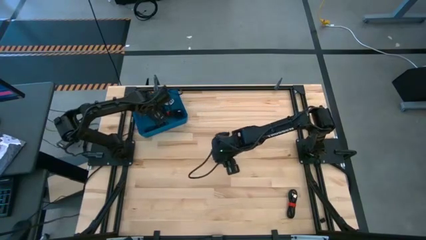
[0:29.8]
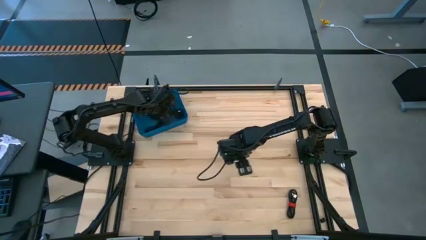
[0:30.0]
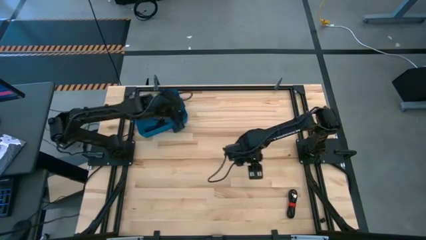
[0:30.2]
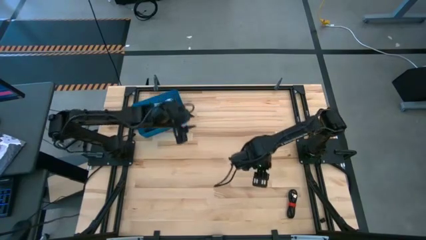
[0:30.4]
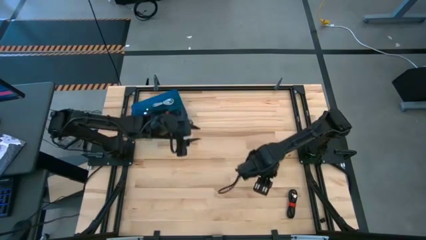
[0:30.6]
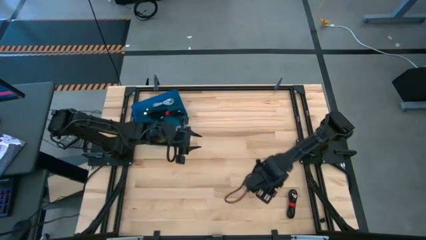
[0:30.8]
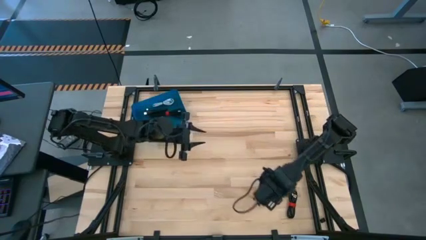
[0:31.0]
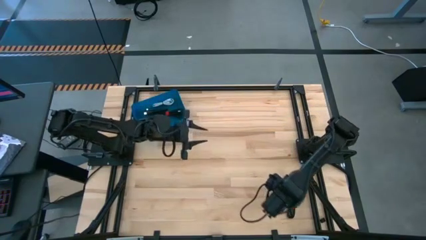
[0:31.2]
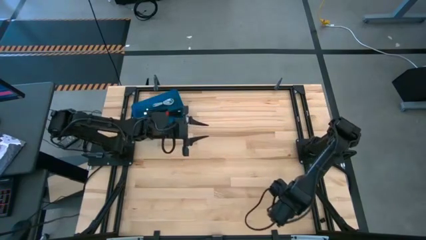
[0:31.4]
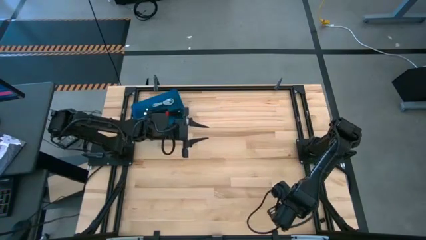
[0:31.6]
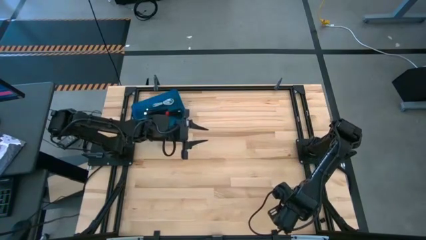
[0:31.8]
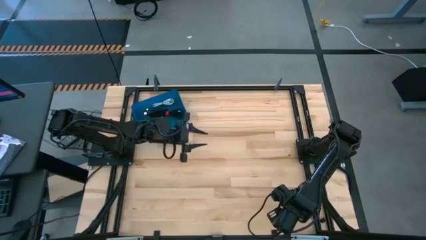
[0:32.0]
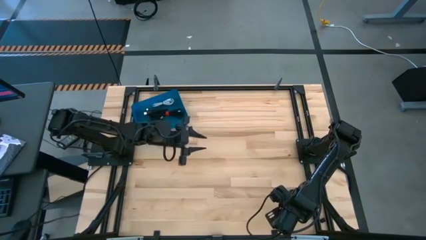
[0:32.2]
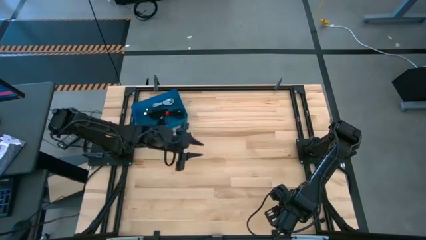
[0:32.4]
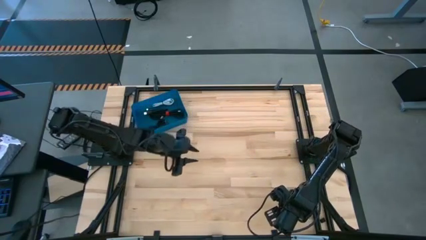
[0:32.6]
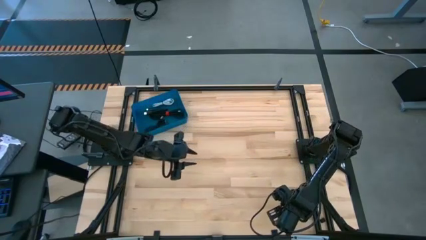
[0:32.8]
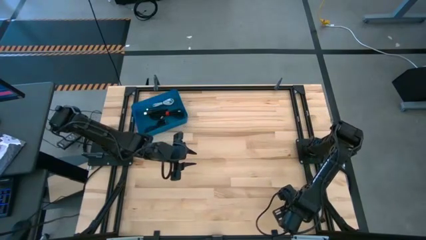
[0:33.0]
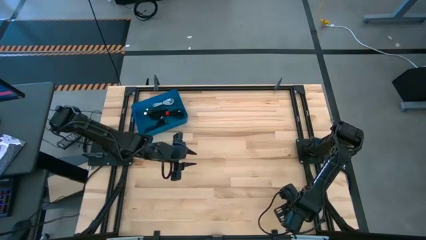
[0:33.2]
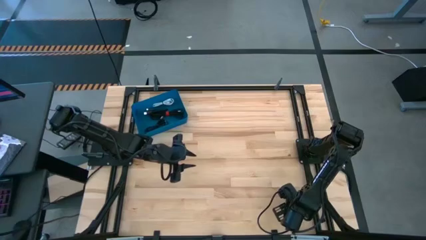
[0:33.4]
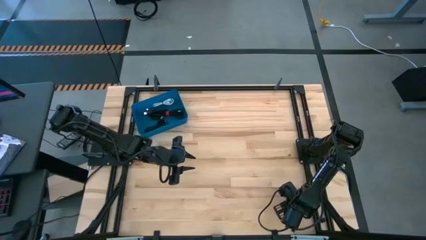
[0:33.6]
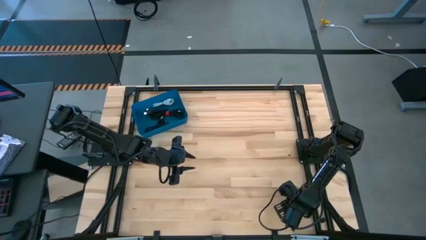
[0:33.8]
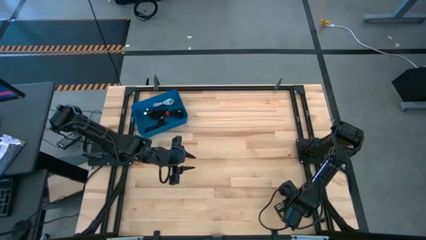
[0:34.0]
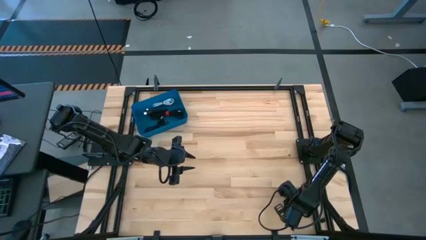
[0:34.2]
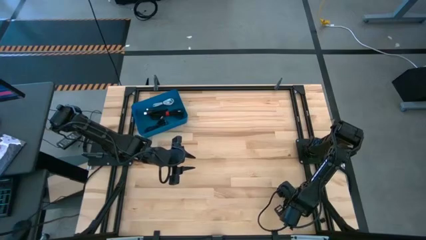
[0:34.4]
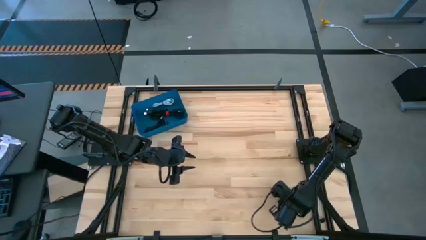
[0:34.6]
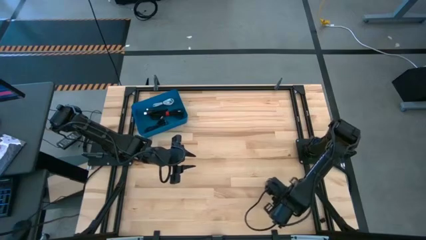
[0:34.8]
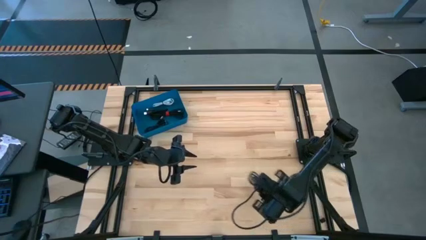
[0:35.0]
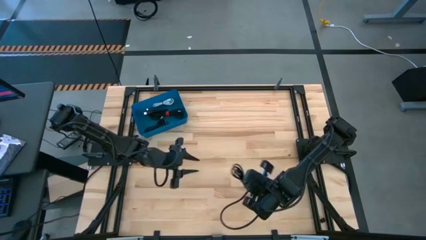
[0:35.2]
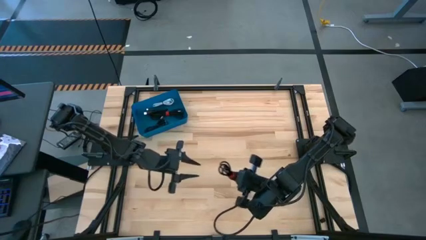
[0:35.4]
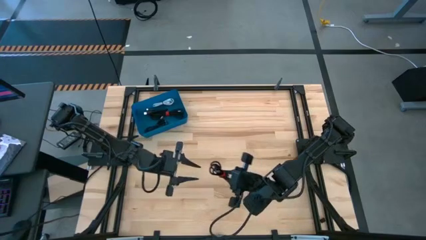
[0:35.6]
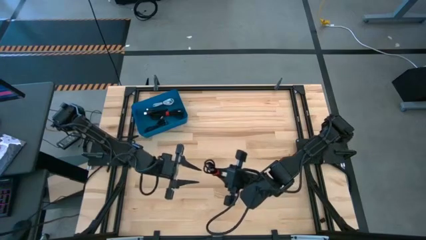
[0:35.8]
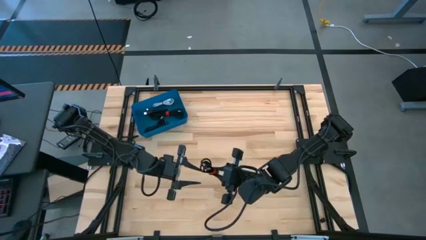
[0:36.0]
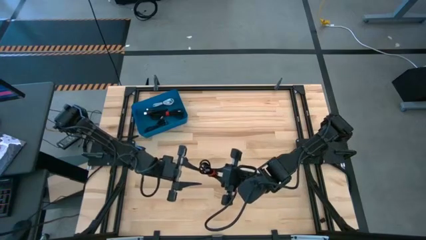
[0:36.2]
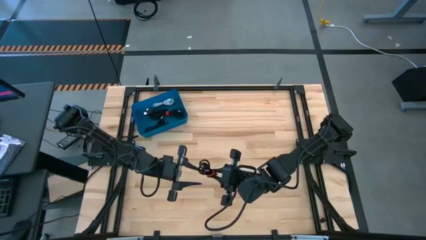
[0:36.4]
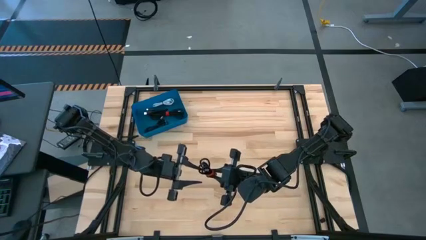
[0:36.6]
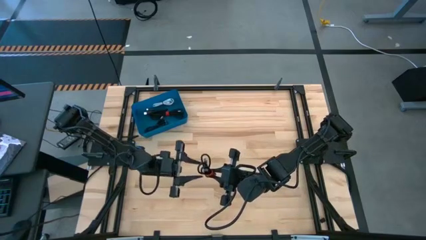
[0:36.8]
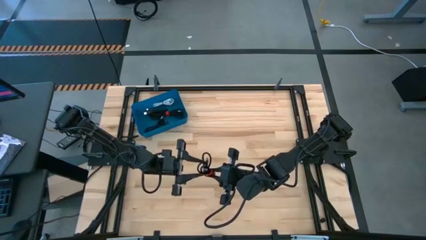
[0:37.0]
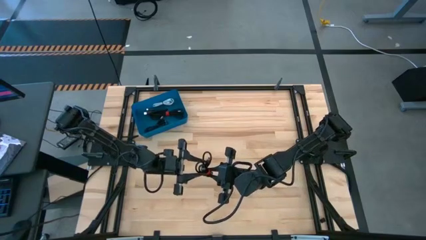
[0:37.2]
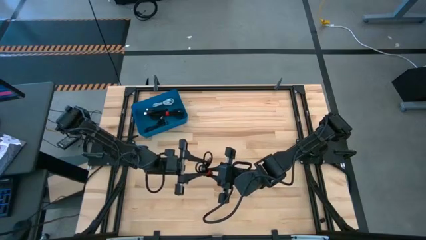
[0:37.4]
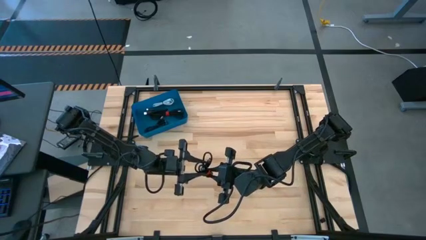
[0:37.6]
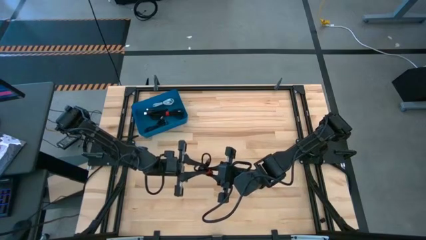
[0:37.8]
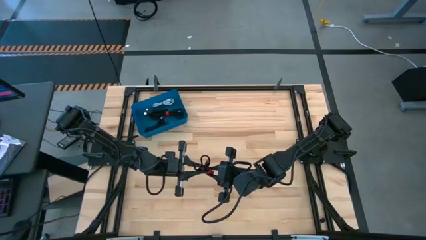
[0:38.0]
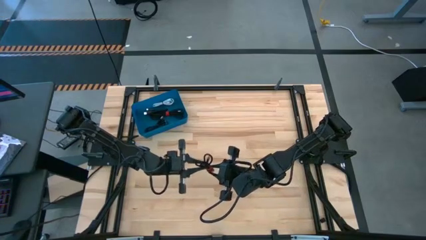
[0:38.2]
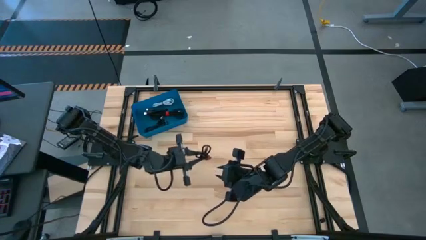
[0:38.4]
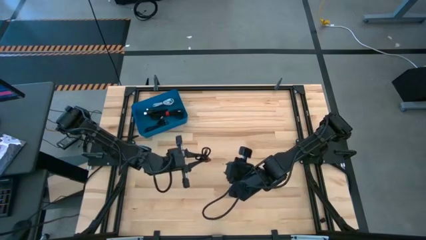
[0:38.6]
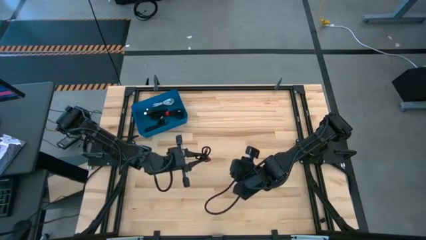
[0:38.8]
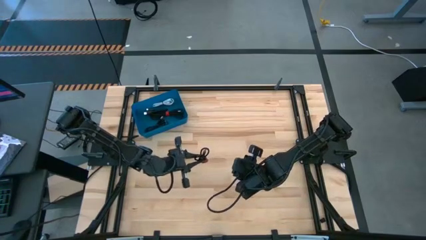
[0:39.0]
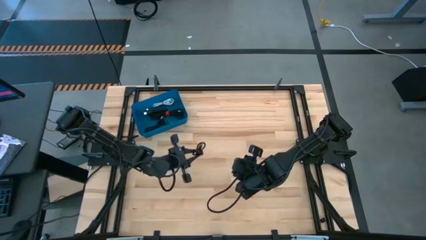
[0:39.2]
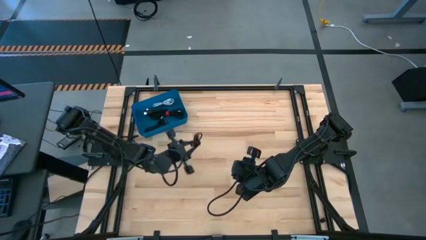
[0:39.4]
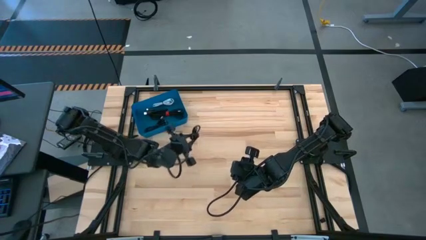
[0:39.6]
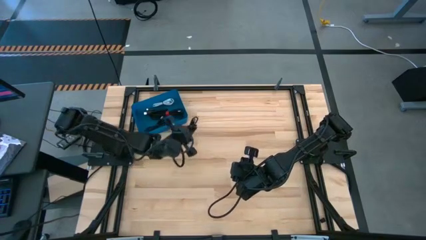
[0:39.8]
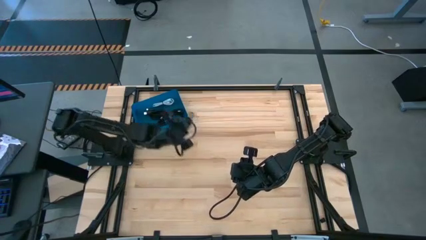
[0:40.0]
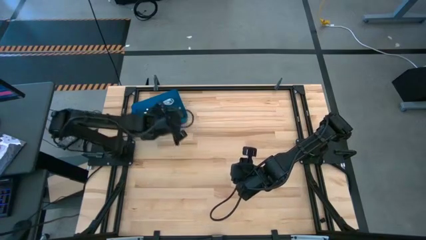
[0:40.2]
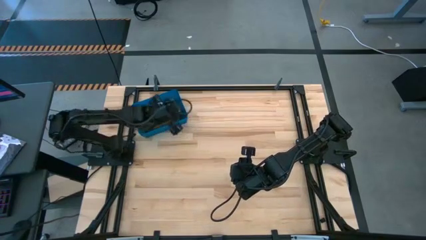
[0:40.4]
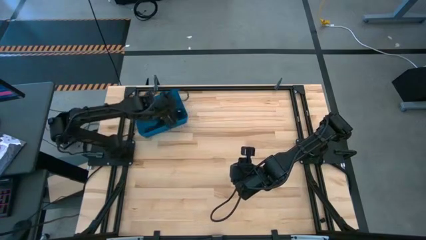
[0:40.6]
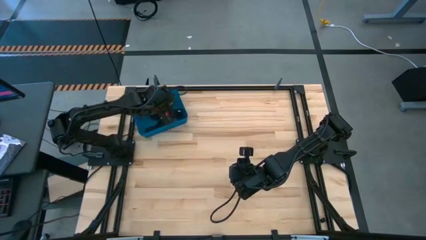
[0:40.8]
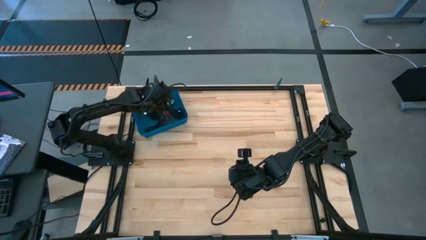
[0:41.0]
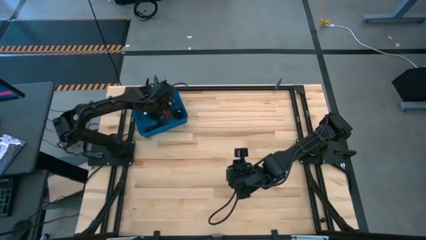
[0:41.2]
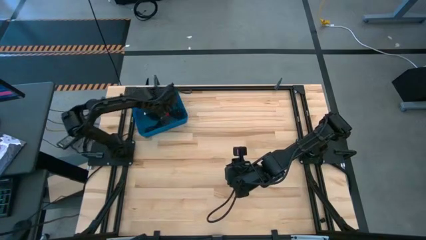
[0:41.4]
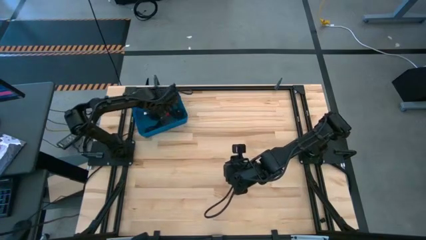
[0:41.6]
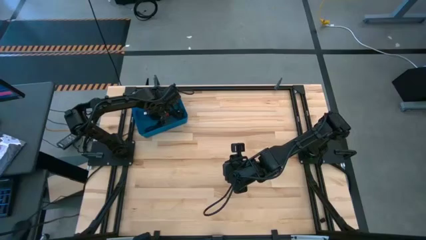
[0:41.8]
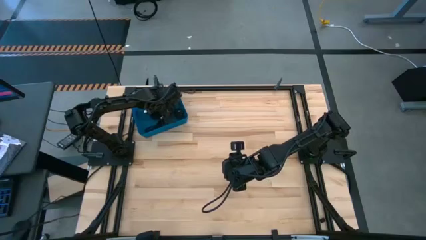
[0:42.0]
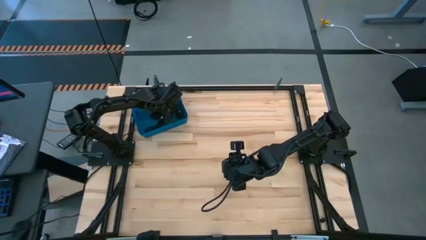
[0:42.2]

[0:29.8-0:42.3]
Task: Pick and place USB-C Cables
Put the black charger cable into the blue bin

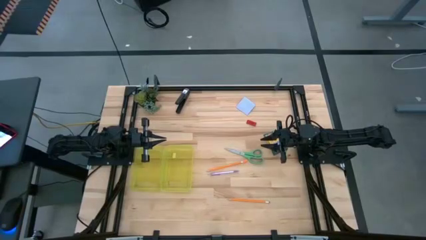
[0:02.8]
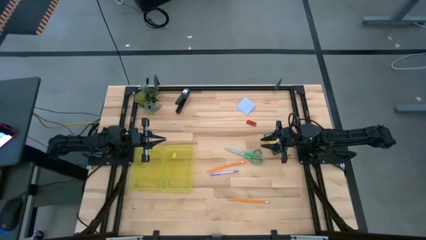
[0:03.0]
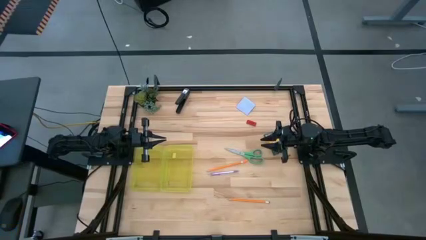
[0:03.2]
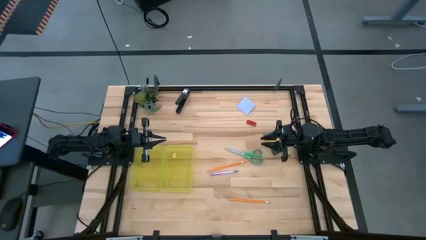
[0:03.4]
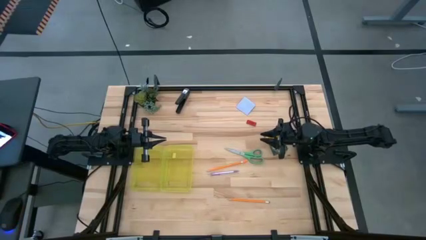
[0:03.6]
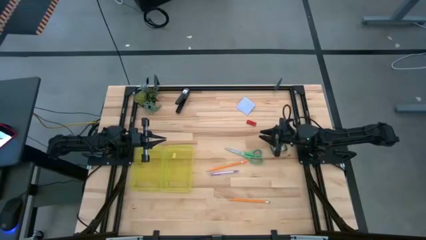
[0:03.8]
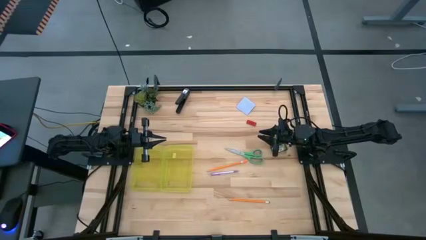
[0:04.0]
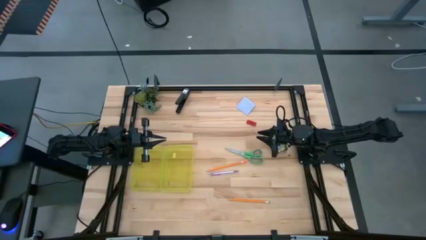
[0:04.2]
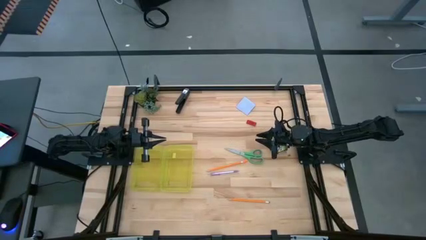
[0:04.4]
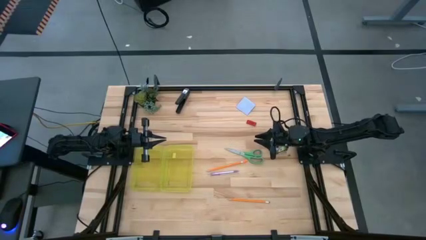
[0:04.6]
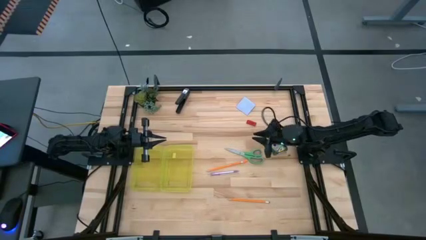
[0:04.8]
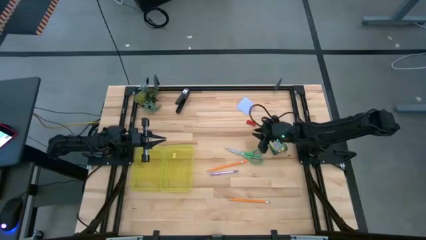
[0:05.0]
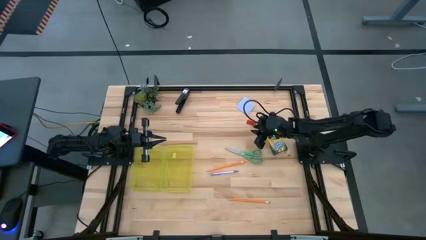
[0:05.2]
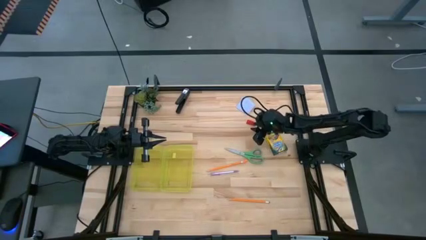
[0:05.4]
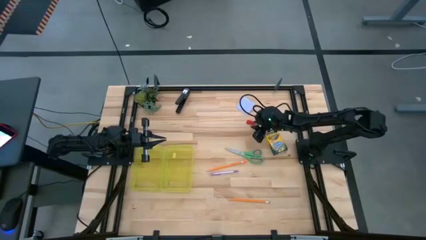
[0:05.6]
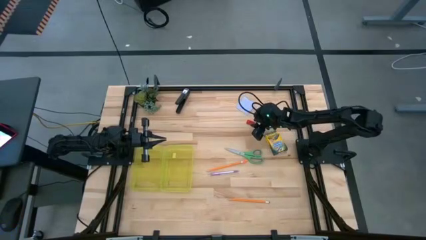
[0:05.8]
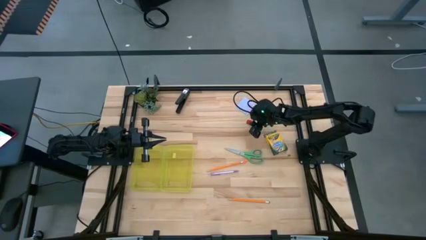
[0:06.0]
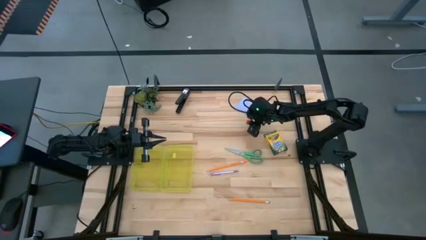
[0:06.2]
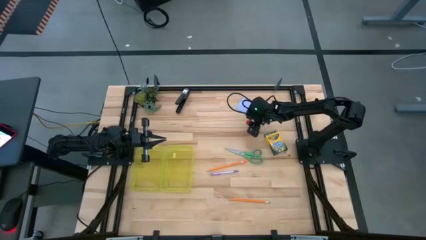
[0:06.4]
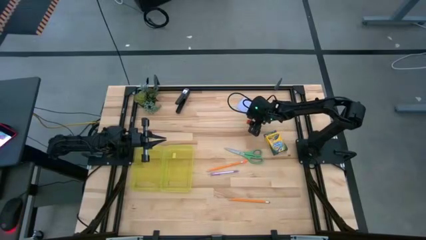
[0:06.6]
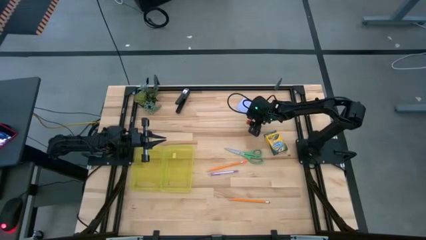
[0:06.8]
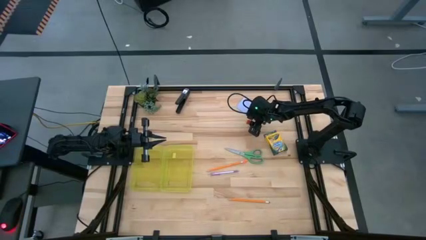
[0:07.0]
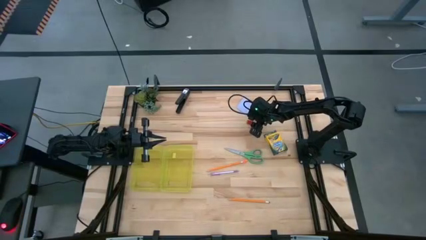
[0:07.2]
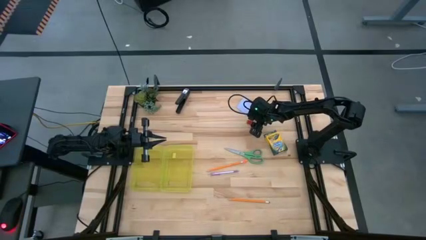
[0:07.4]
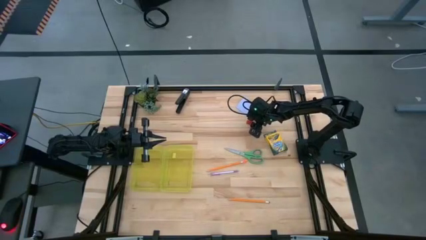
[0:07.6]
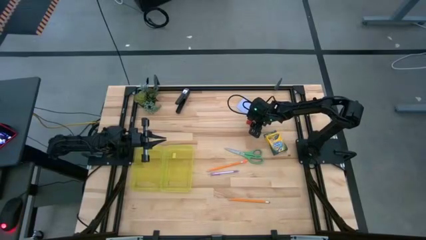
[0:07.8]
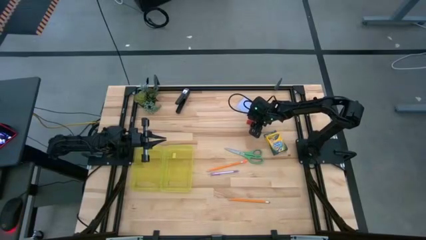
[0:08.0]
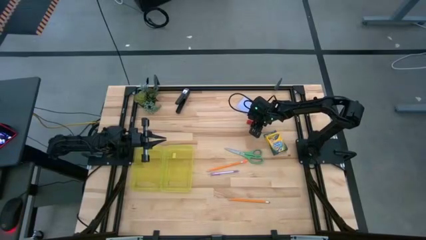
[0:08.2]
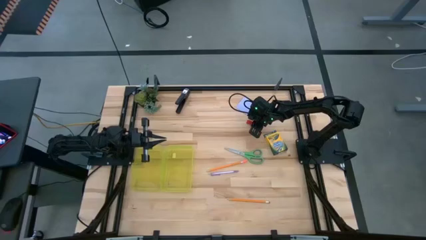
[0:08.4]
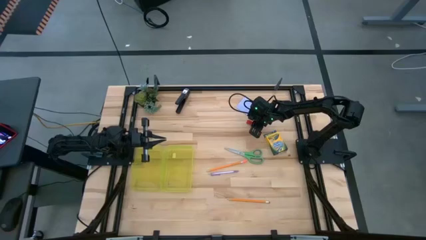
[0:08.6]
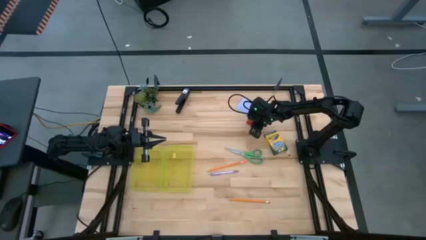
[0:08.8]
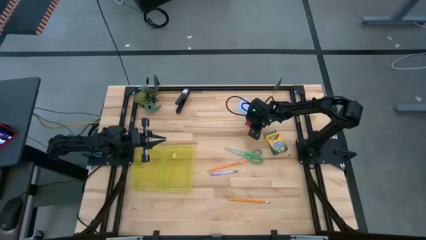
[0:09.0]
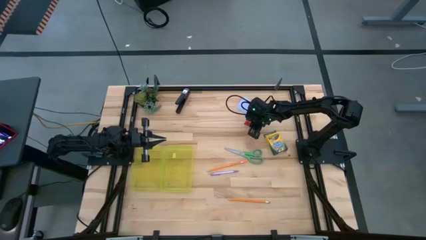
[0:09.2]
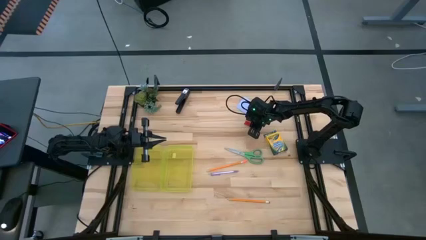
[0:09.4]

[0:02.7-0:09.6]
Task: Pack school essentials
Put the red eraser into the yellow pencil box
